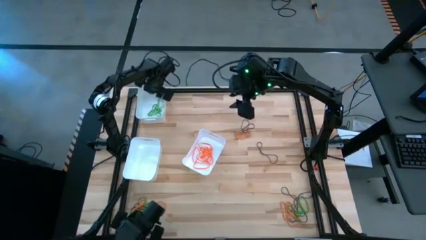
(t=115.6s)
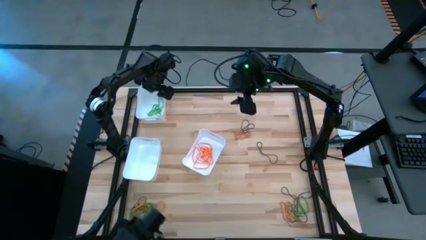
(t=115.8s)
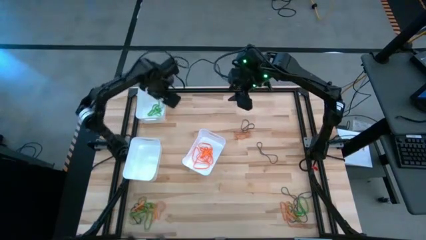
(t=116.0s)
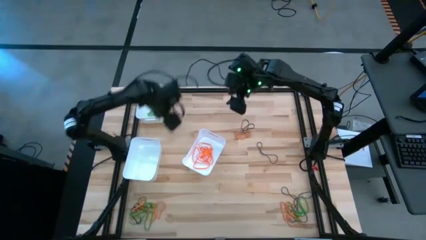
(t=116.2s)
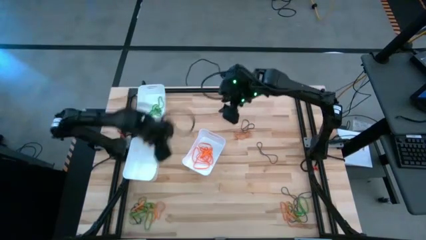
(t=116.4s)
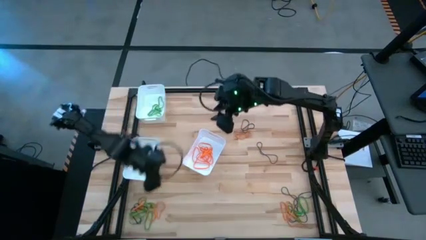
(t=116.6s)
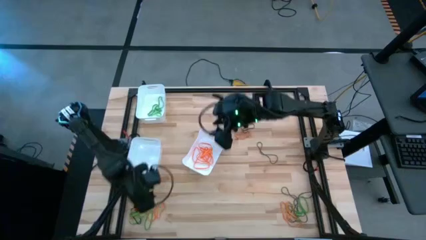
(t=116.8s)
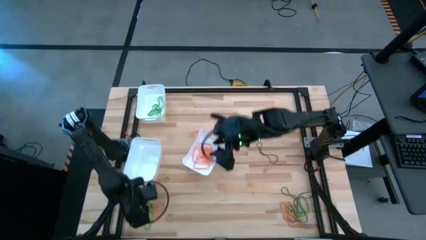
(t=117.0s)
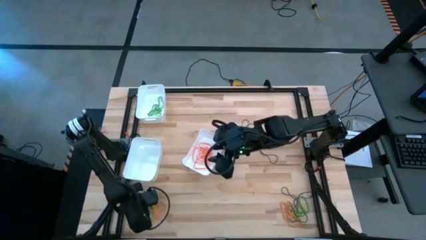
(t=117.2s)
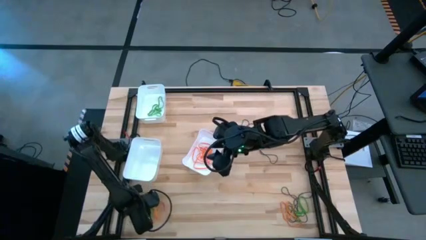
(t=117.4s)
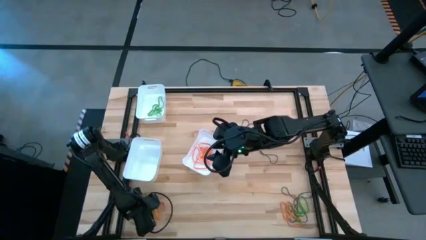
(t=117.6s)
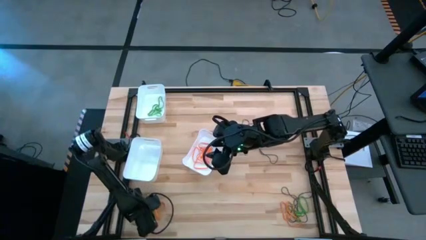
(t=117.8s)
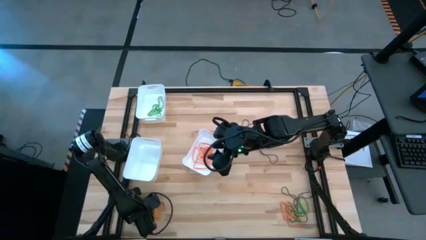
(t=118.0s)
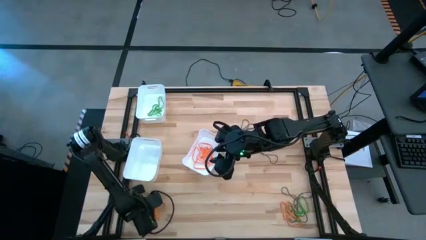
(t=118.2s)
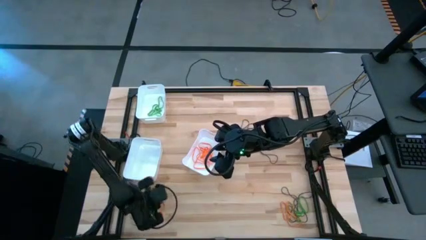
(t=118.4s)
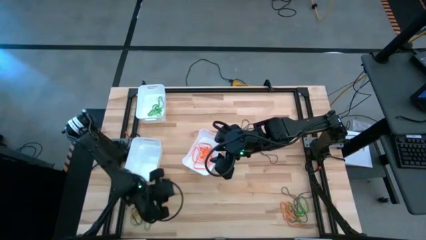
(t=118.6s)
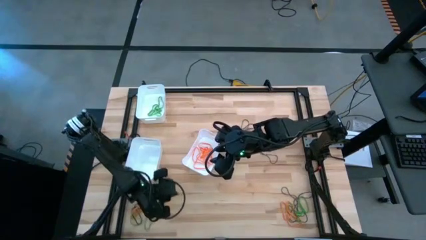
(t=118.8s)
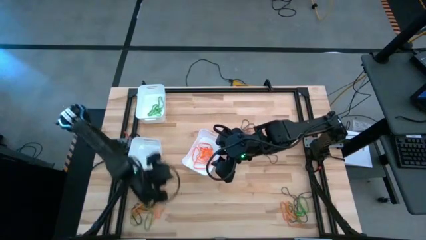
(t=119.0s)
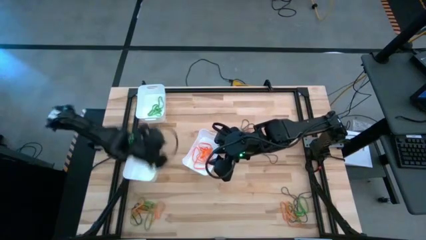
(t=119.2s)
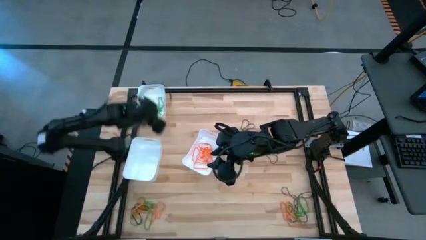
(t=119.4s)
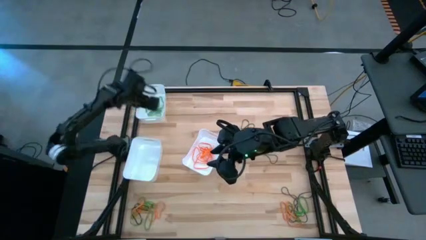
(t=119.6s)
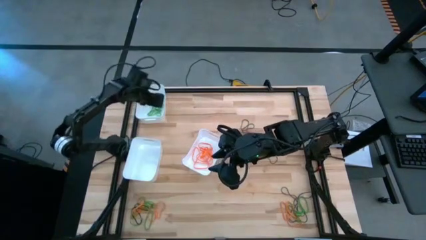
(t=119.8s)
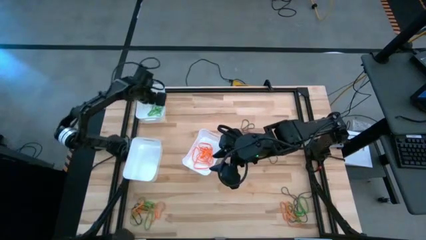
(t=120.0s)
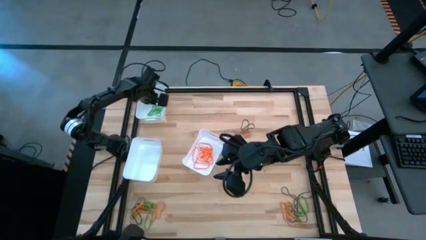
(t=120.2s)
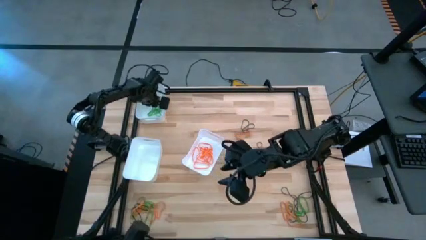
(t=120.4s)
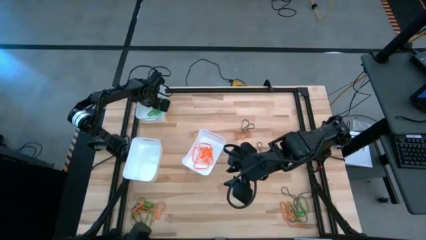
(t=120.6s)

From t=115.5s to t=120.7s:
Task: Sort rubber bands into baskets
Put the green rubber band into the top white bin

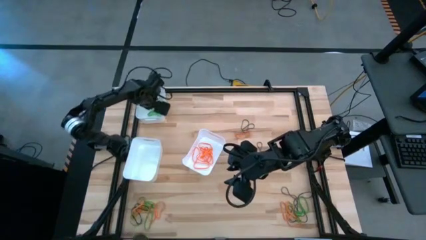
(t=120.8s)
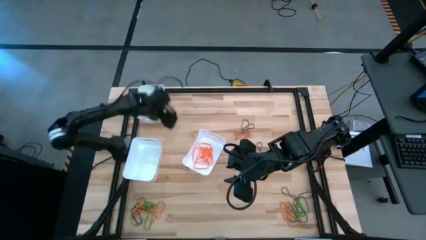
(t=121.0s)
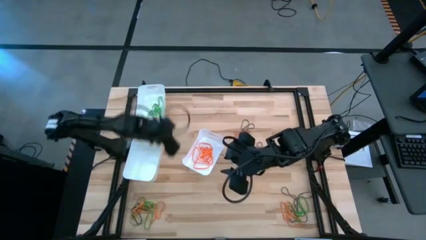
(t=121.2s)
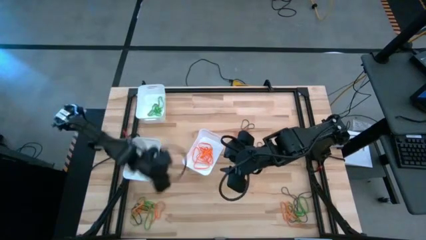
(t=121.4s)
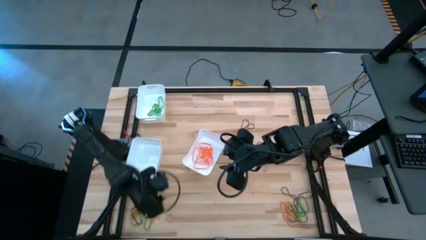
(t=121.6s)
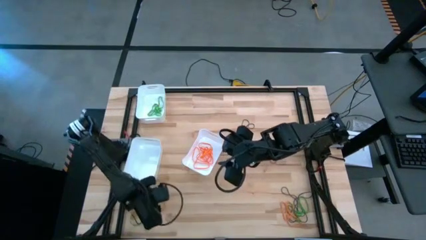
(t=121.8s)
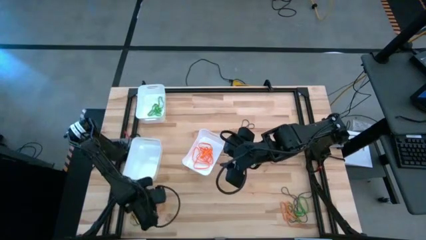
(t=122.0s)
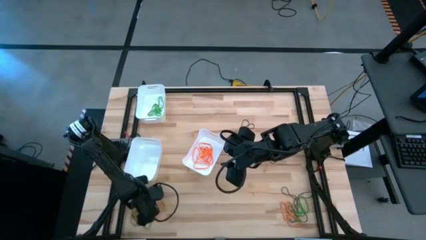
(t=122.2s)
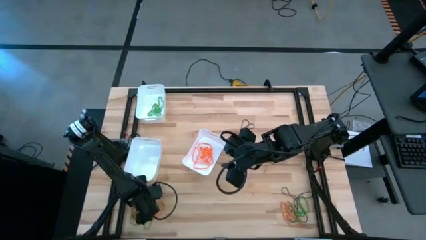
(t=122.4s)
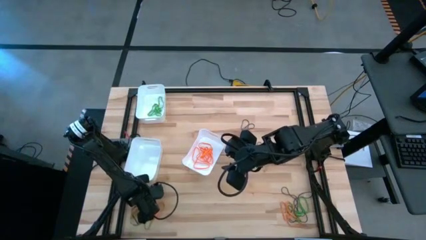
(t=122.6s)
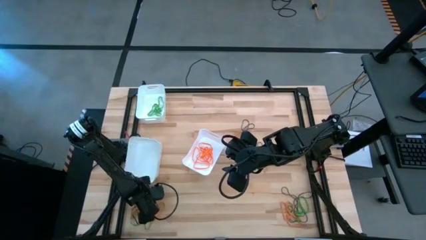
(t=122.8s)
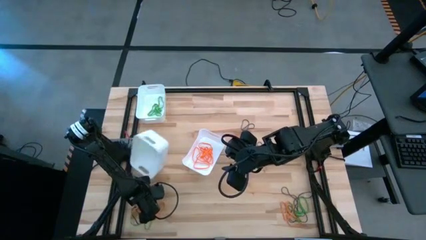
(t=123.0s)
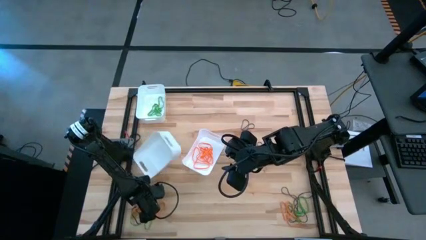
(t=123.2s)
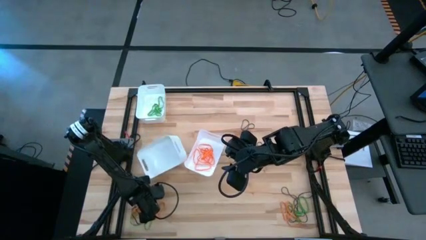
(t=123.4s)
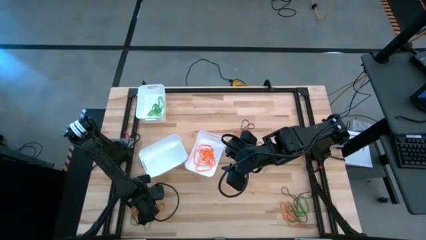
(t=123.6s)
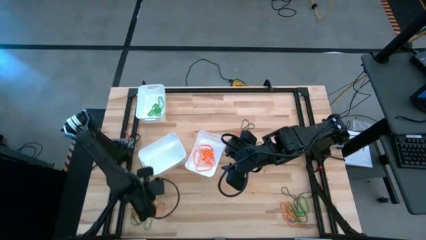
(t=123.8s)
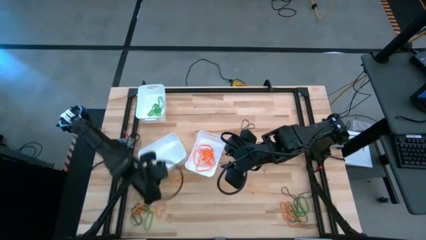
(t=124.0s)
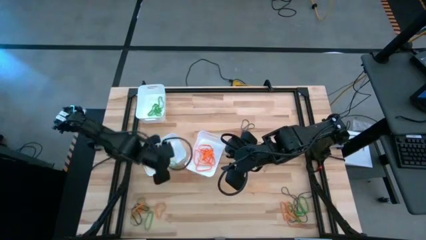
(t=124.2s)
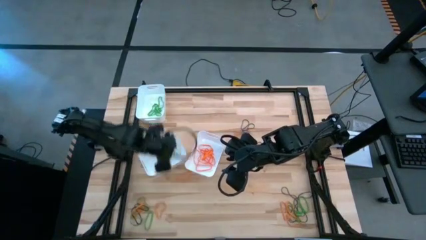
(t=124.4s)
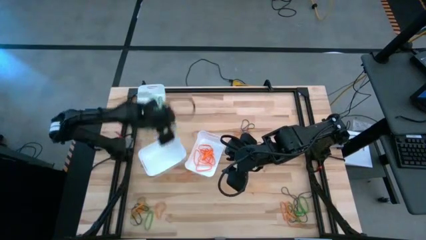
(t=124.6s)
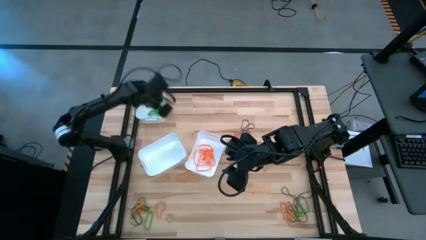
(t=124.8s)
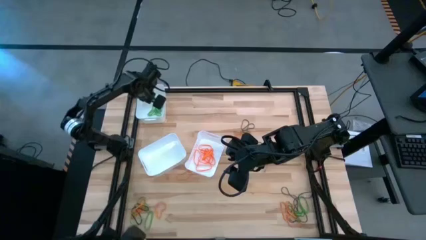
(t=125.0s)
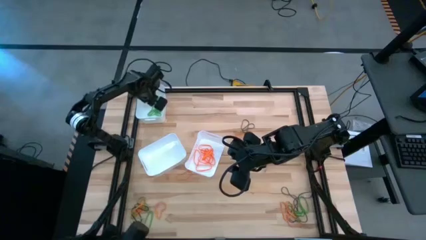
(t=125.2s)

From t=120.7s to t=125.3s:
Put the green rubber band into the top white bin

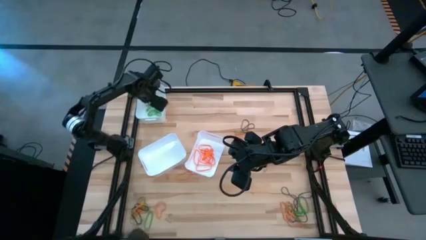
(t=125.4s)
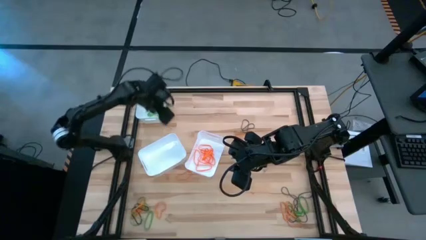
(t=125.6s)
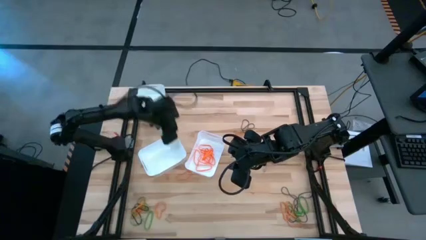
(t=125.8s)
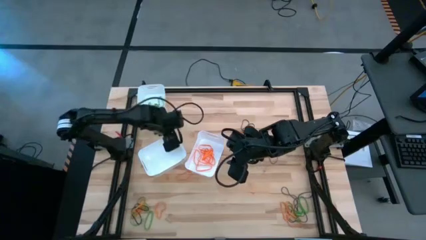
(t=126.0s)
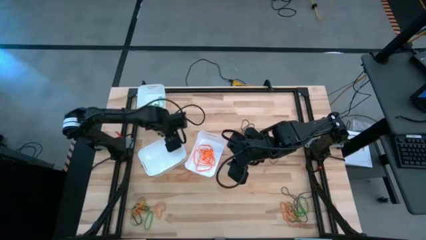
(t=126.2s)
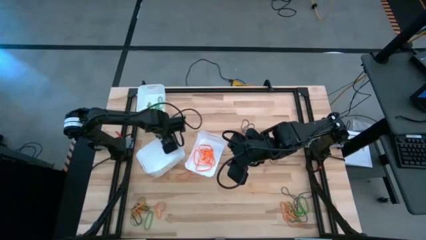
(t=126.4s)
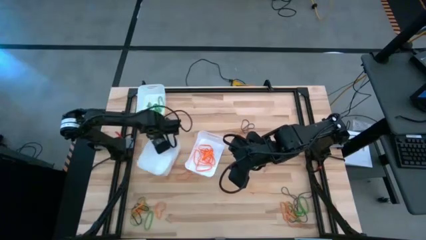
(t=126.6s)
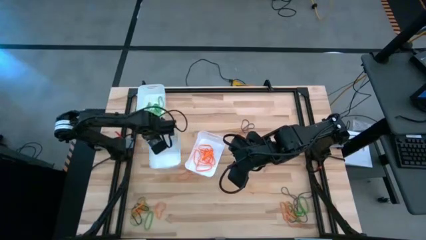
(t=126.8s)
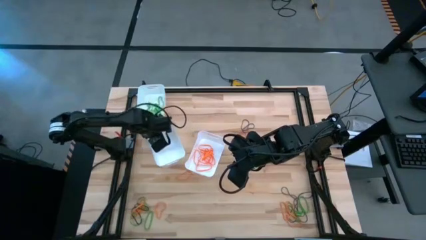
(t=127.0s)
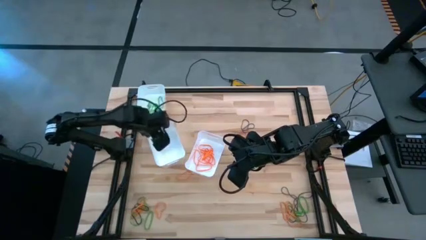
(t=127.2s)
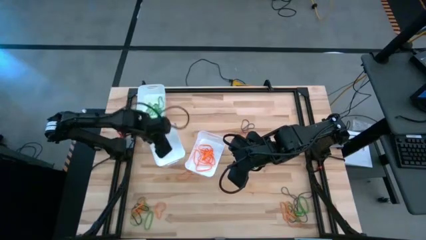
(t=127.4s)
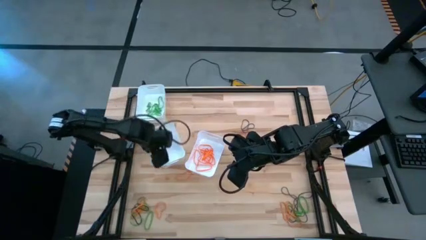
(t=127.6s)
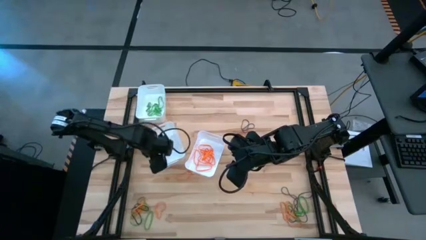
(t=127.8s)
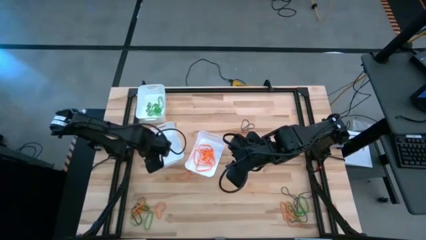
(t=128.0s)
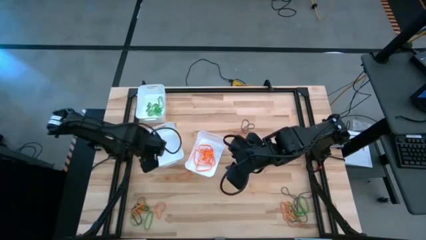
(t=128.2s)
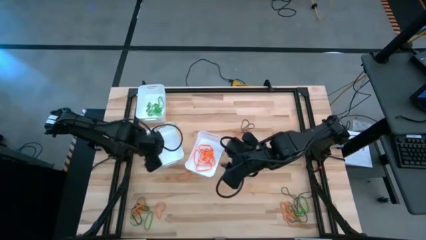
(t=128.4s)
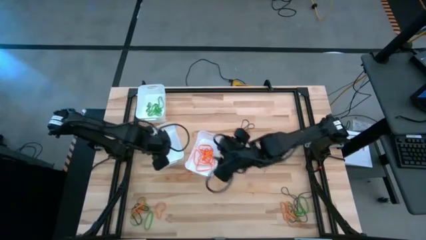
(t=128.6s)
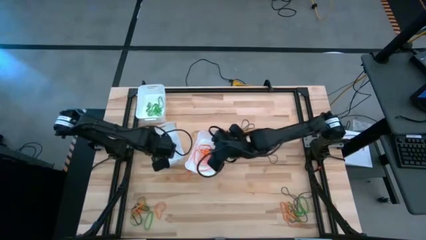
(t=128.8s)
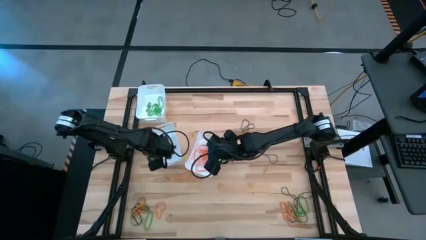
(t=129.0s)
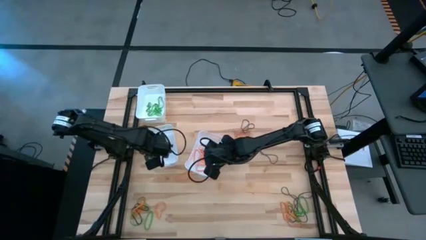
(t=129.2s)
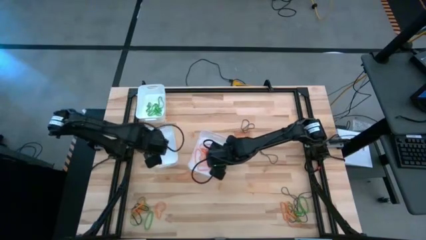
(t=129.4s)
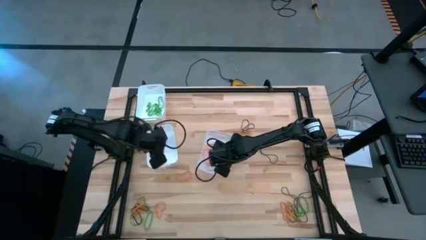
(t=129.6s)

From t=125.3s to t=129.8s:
Adjust the bottom left and bottom right white bins

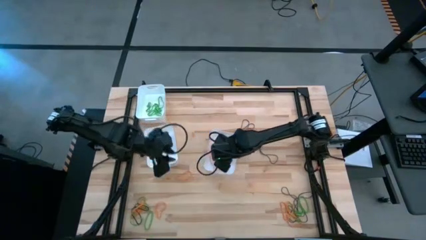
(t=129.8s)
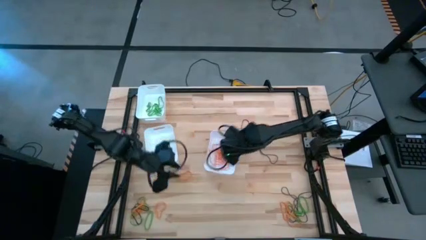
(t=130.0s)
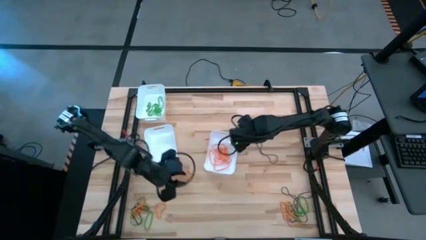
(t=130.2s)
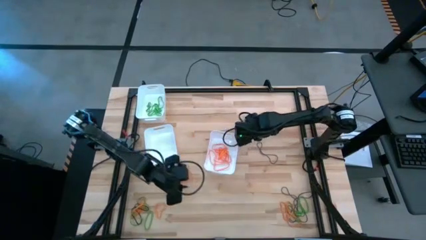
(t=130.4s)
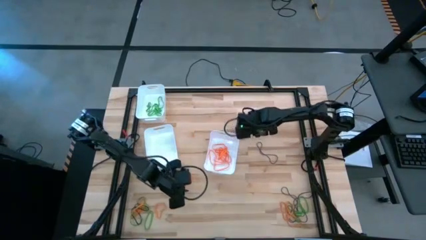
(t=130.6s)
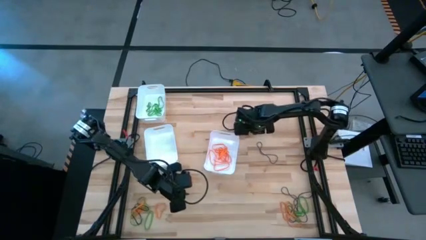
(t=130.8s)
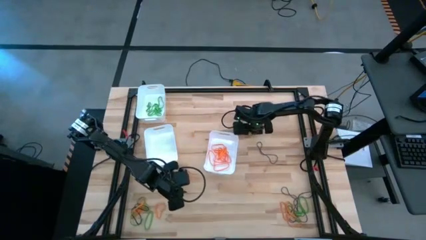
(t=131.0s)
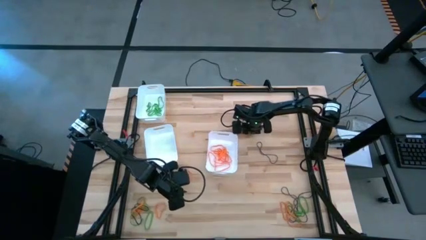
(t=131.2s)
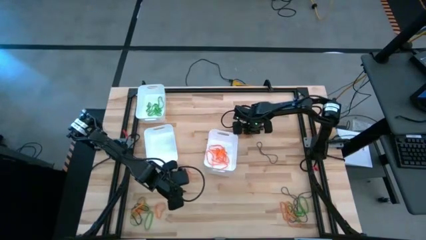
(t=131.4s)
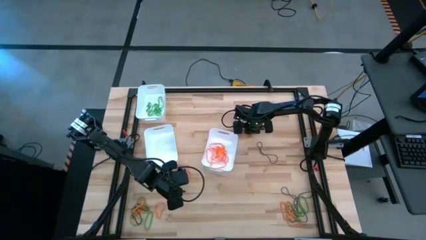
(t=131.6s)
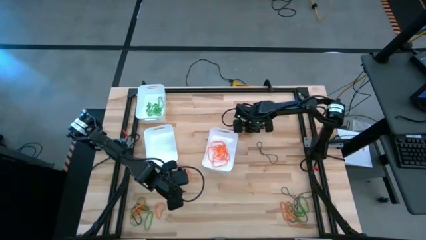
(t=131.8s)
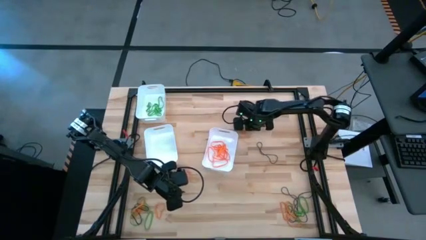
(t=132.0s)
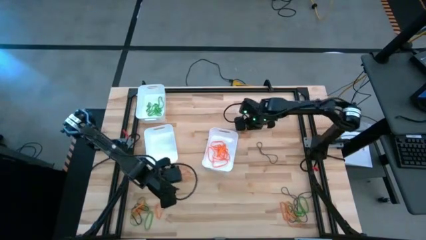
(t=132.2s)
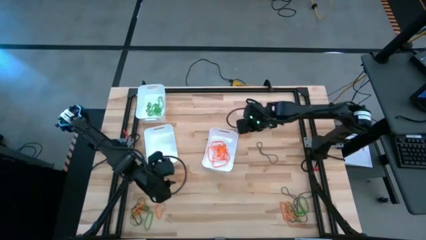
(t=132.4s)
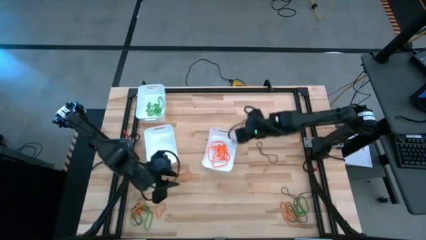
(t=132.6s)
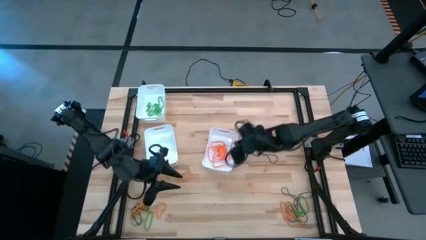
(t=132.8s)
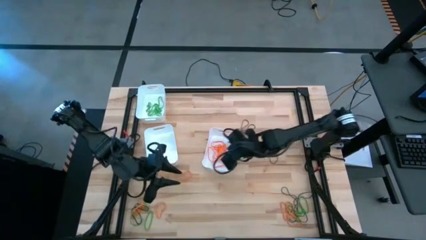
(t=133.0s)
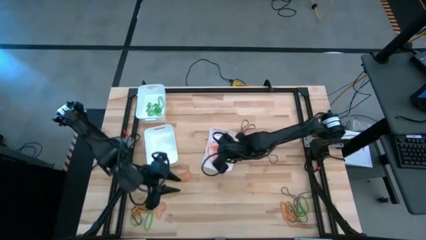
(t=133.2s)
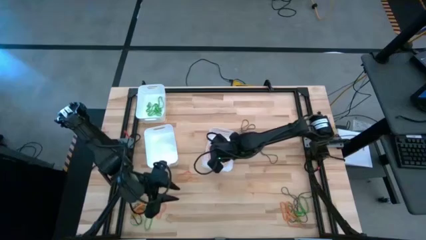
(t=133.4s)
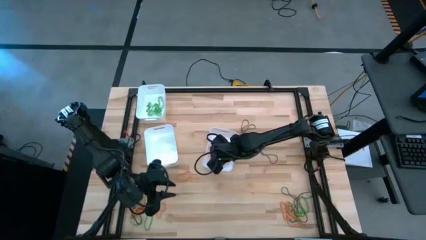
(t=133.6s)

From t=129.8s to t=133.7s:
Put the orange rubber band into the bottom right white bin
